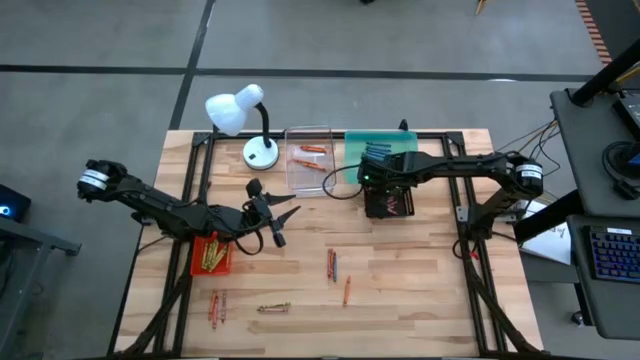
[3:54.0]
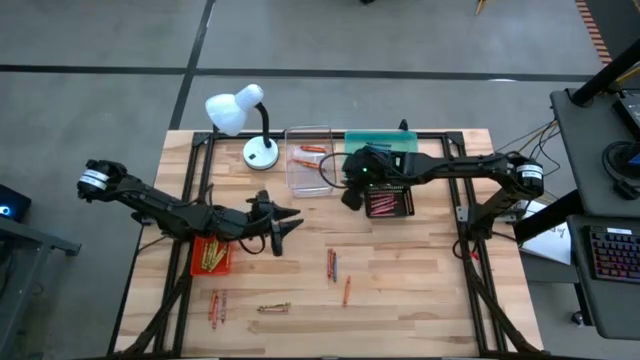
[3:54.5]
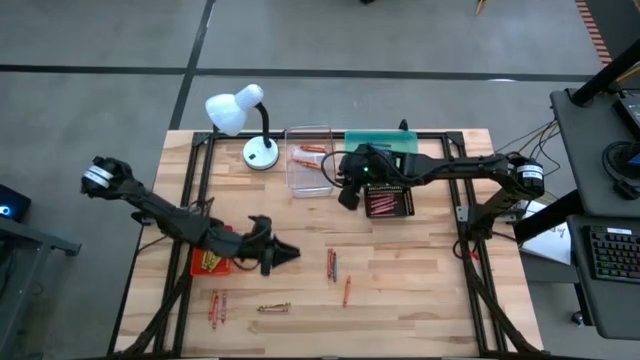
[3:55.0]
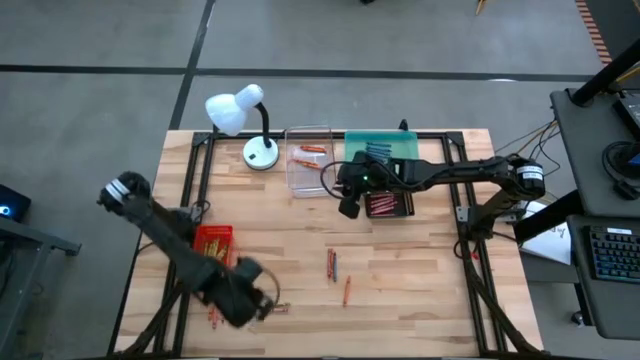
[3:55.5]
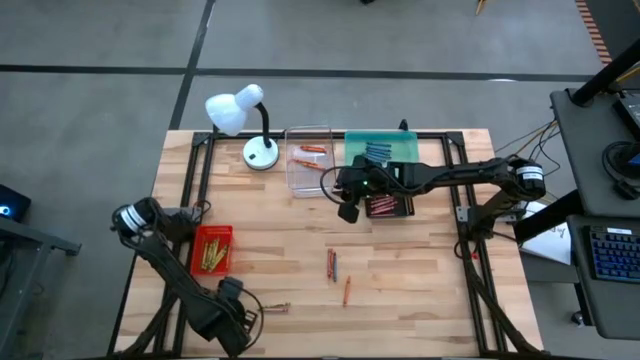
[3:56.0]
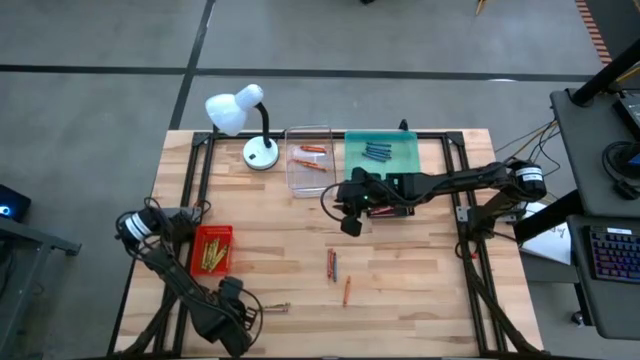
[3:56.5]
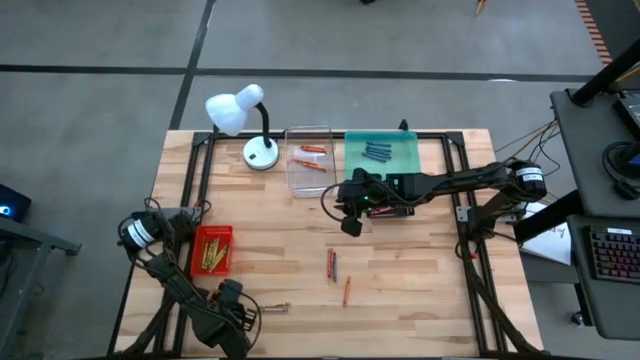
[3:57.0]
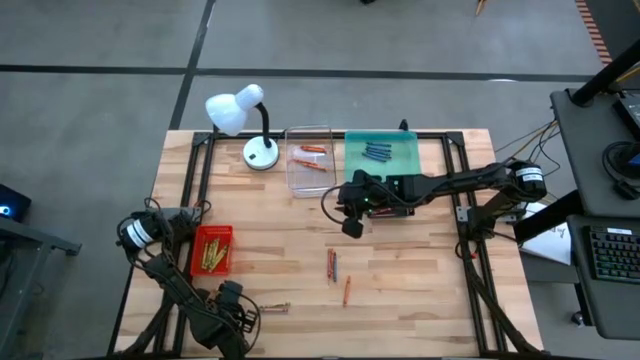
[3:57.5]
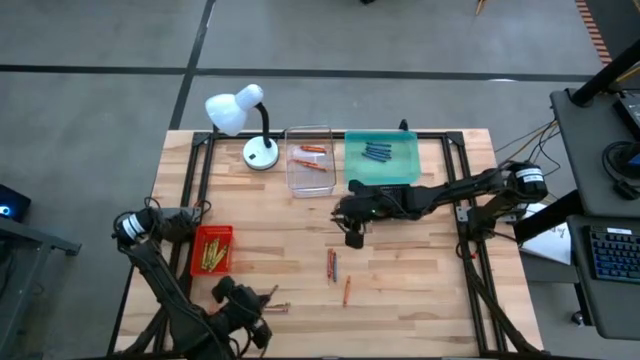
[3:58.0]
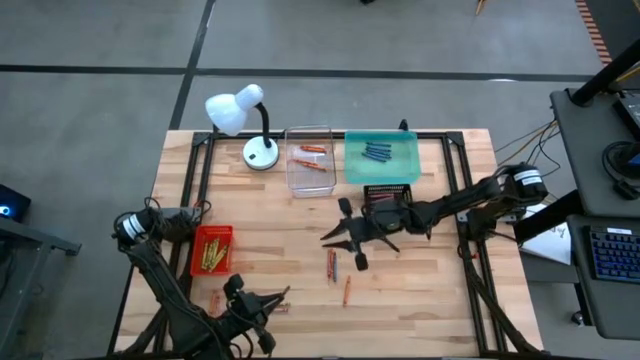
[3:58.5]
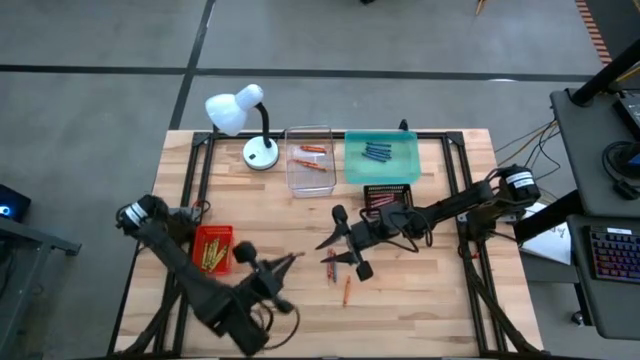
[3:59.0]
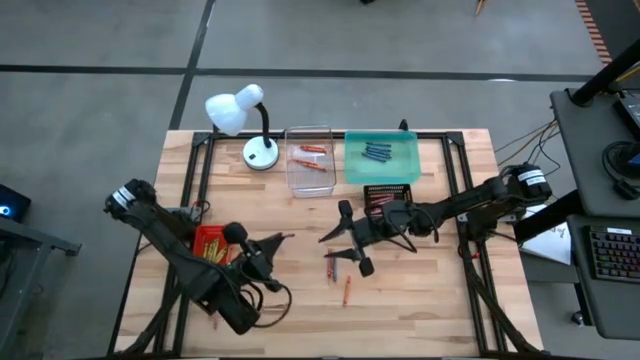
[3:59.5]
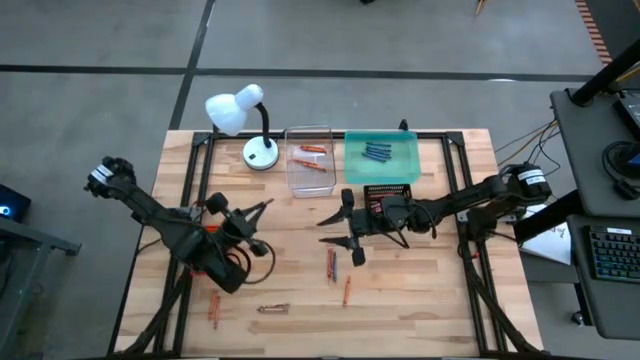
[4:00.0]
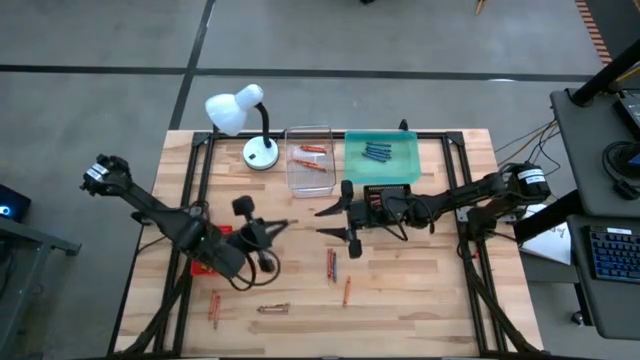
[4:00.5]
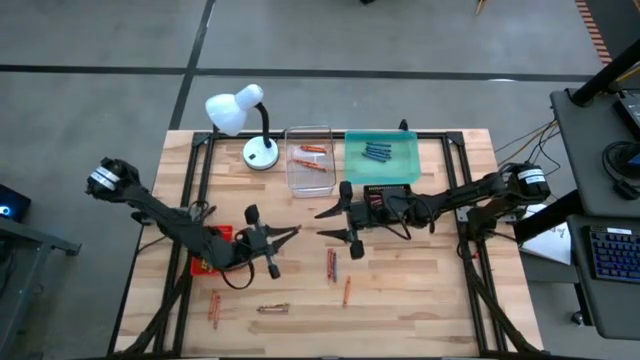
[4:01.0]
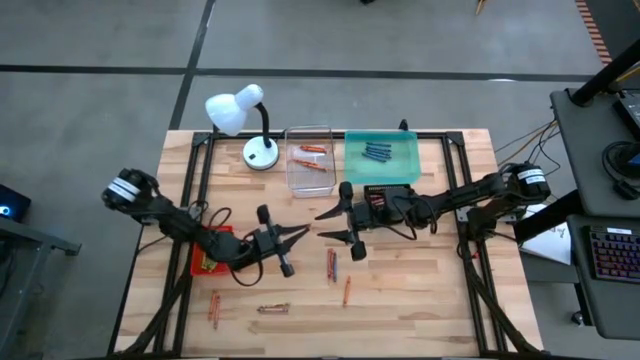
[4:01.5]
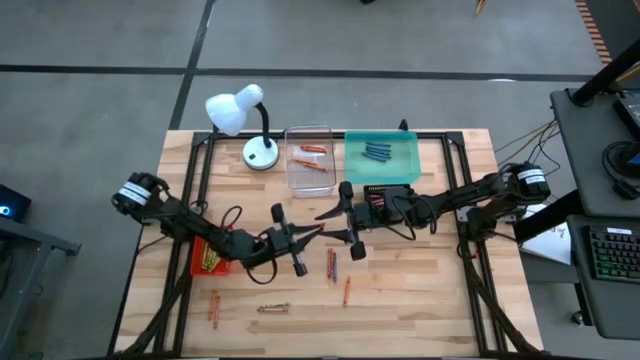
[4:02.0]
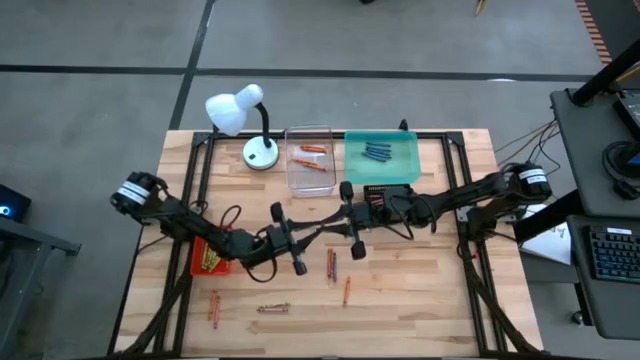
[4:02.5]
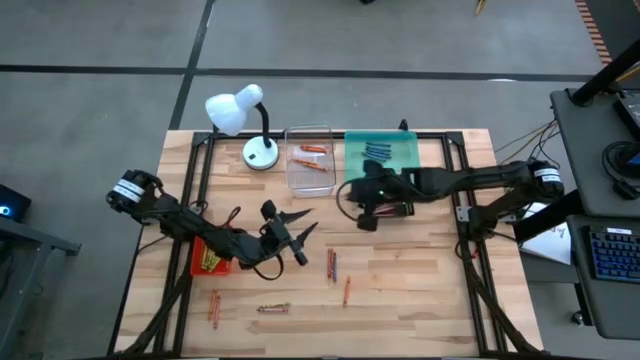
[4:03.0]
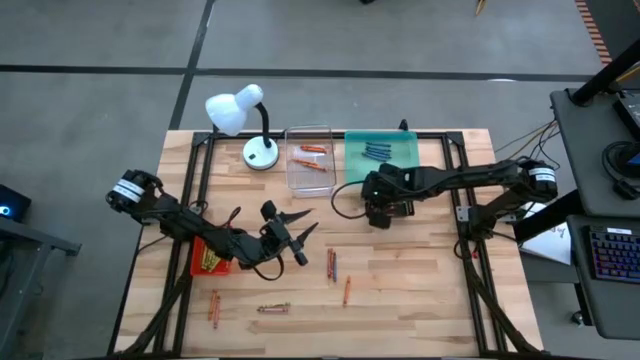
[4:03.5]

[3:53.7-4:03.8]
Task: Sort crayons
Put the red crayon into the black bin

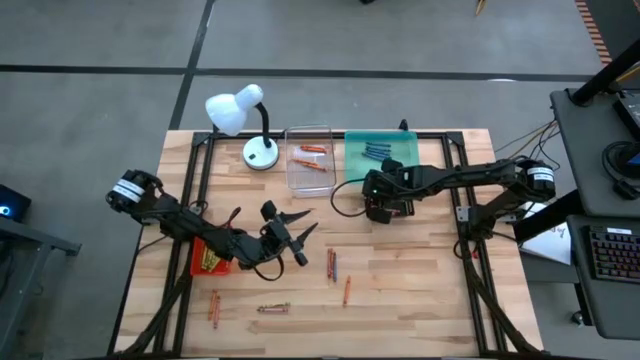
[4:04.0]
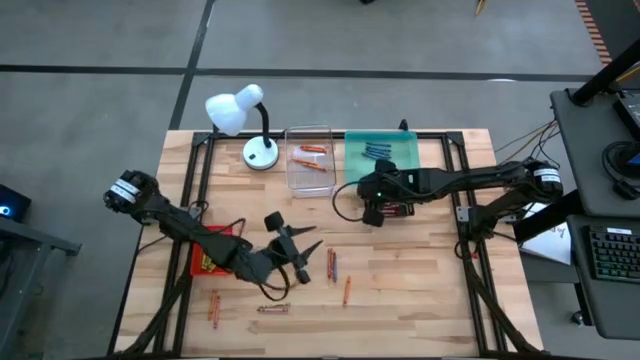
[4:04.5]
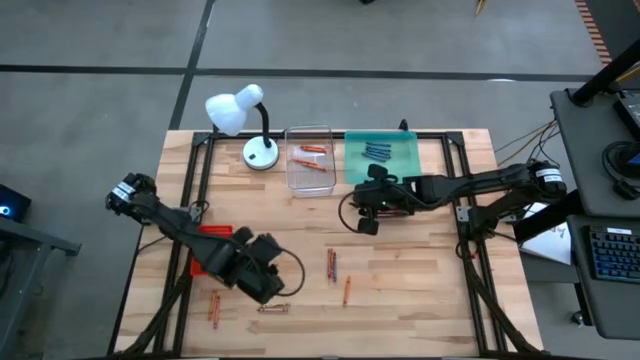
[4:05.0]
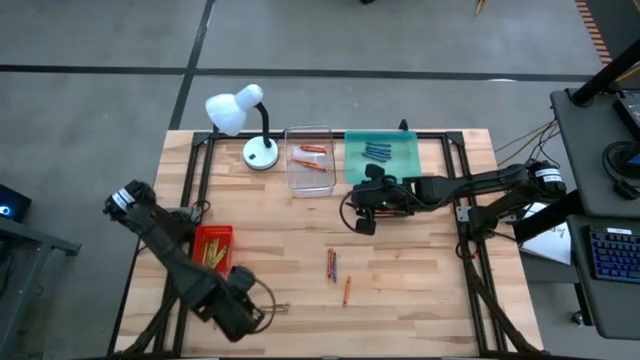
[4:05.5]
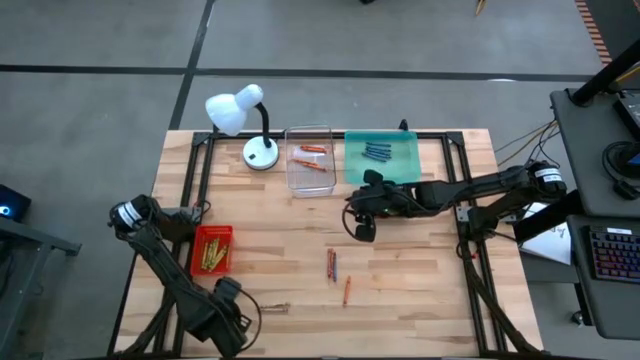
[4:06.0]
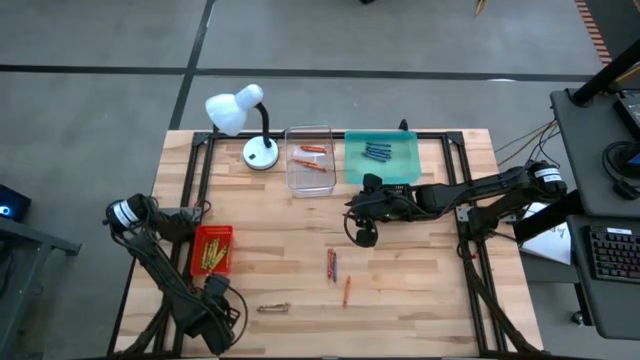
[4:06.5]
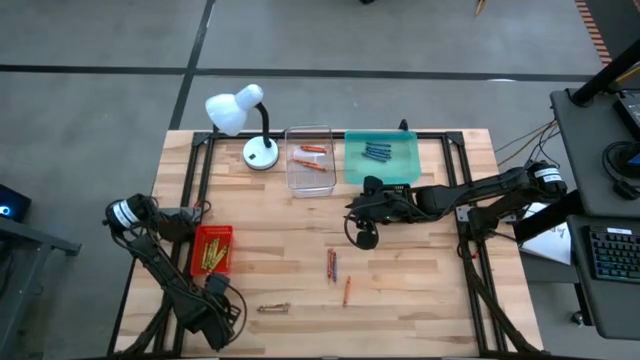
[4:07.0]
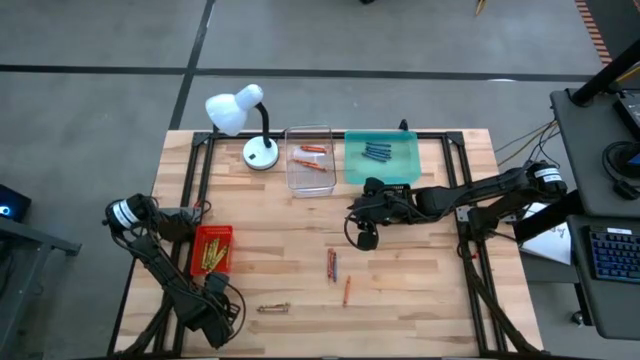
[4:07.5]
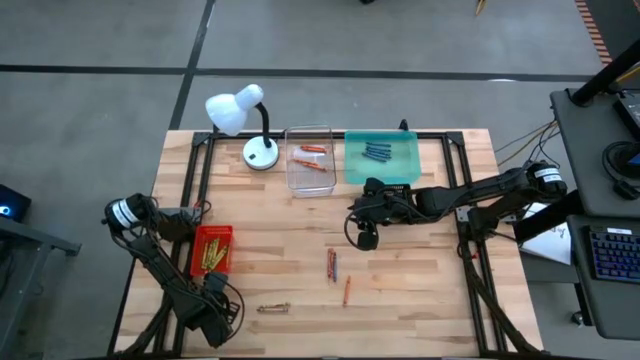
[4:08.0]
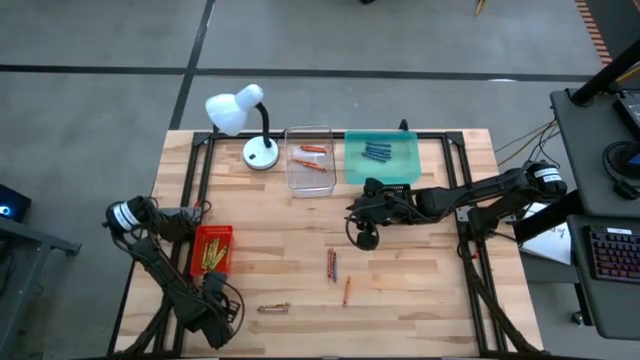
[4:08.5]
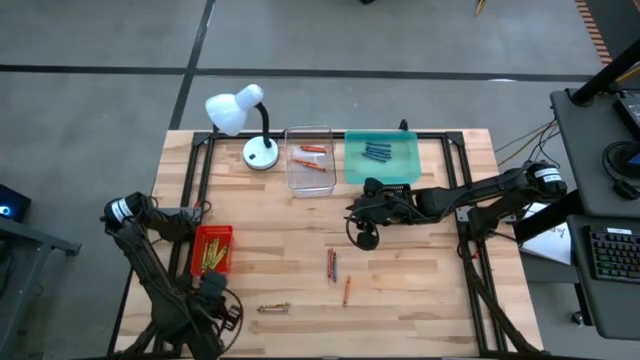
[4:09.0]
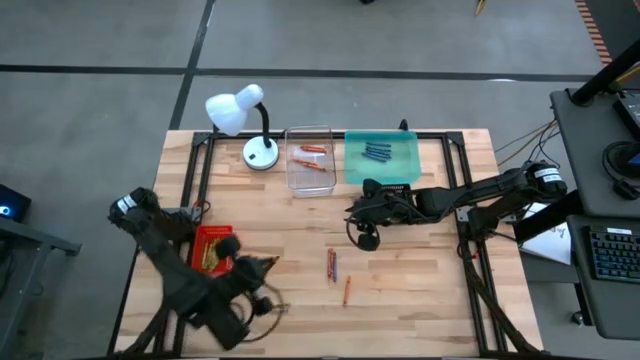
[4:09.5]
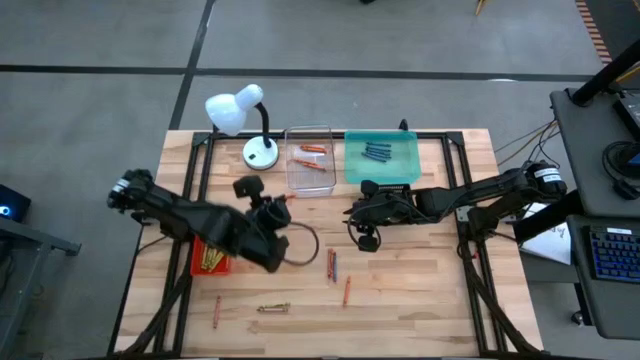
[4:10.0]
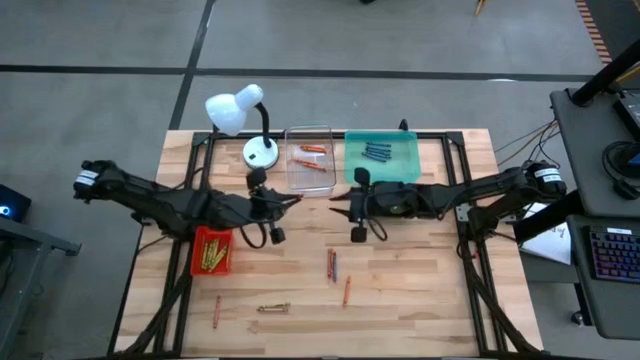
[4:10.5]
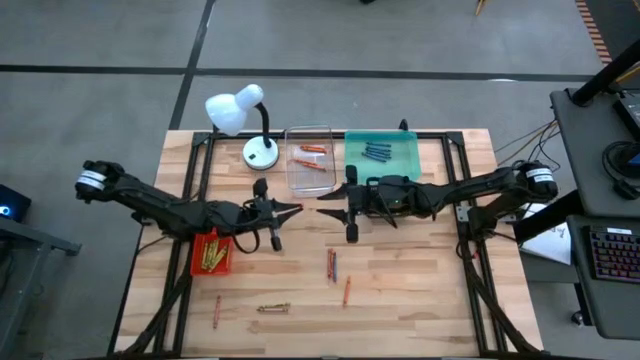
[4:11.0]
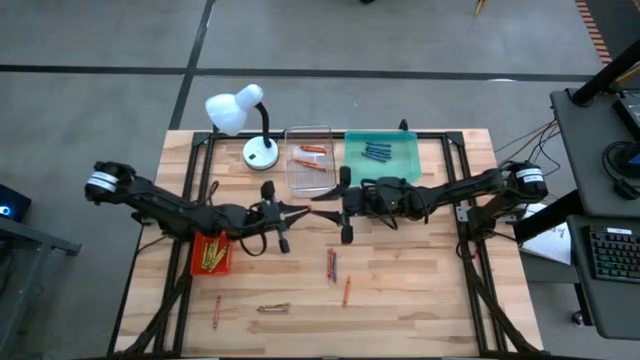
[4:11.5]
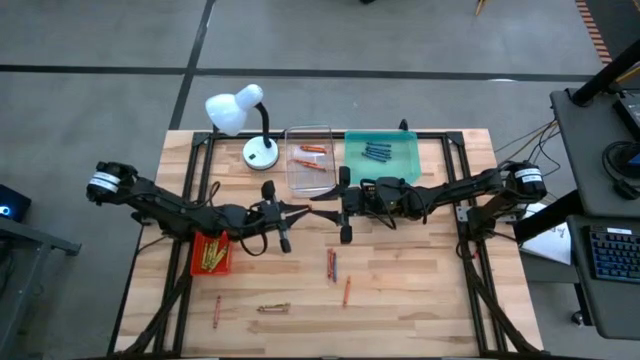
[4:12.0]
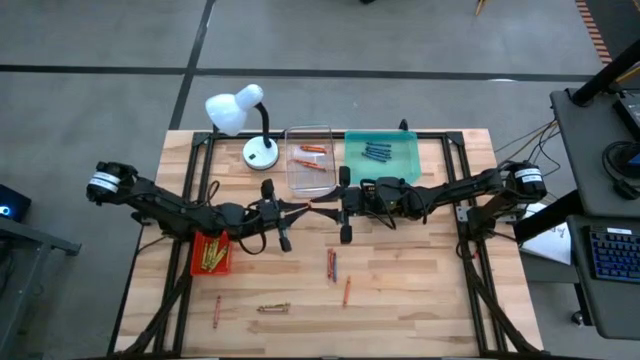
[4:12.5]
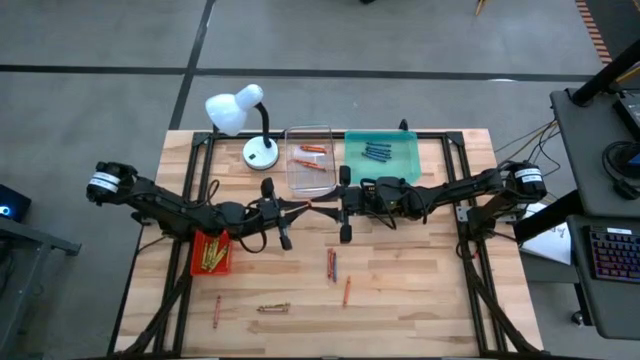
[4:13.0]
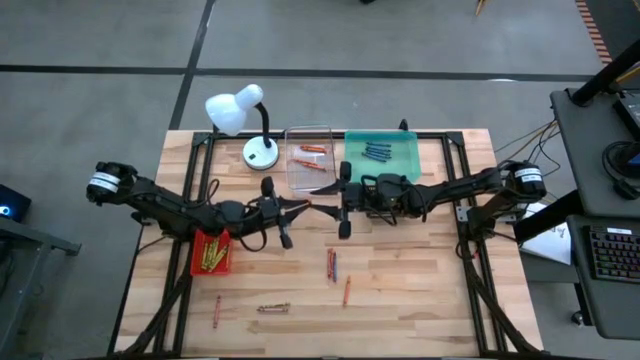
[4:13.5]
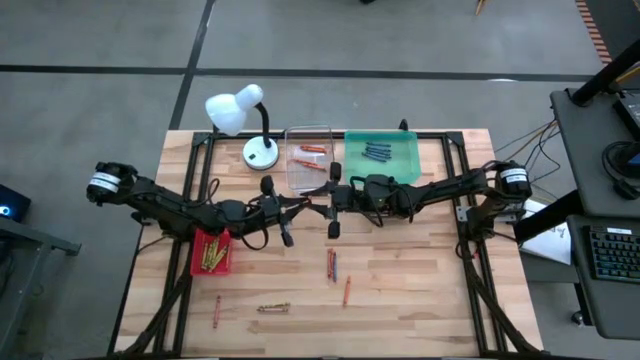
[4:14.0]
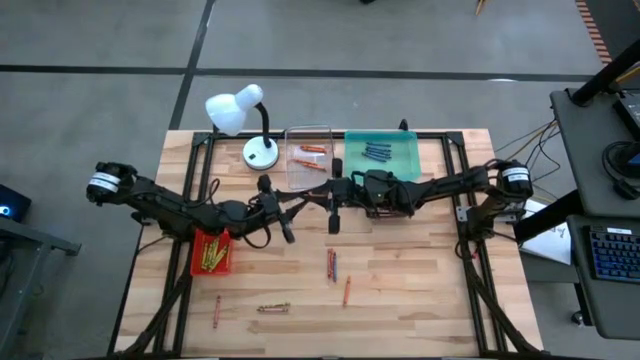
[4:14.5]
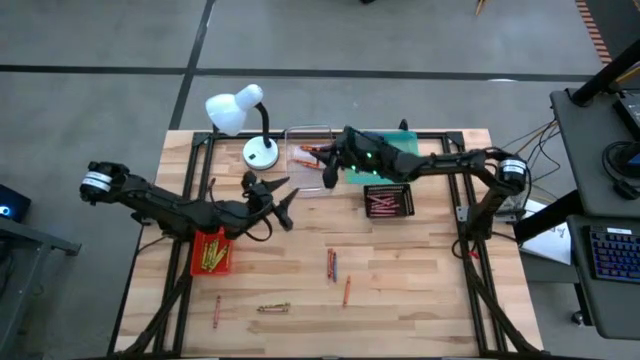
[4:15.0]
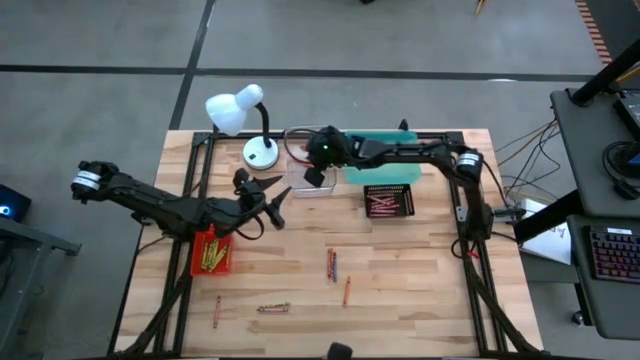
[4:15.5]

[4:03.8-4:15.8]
Put the orange crayon into the transparent bin

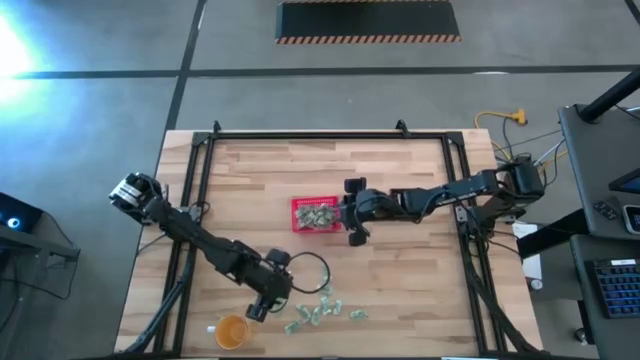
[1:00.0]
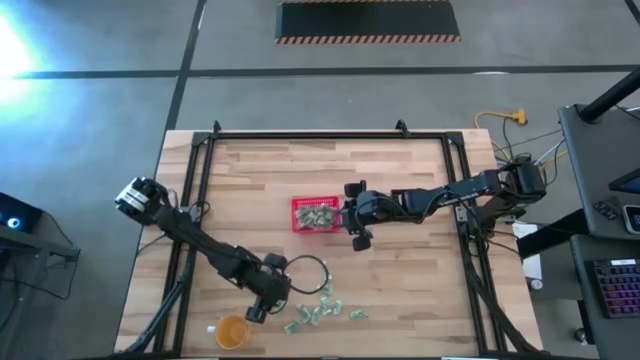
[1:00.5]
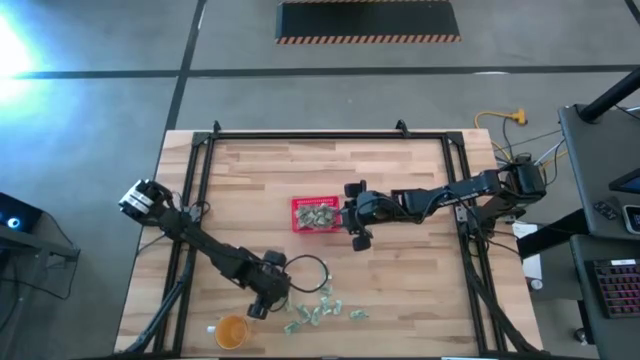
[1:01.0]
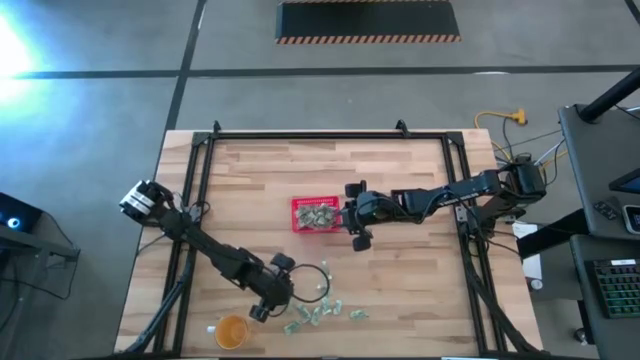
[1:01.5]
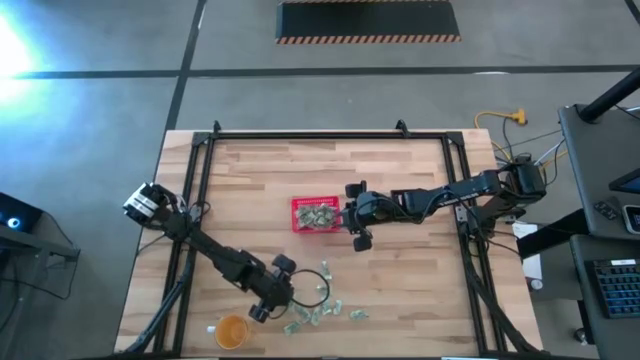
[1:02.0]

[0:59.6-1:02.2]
Task: Pick and place items into bin
Put the stevia packet into the red bin
